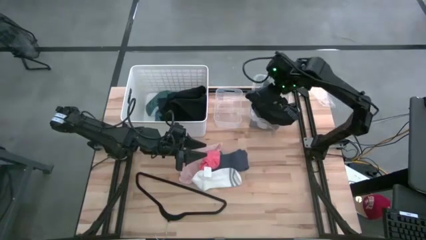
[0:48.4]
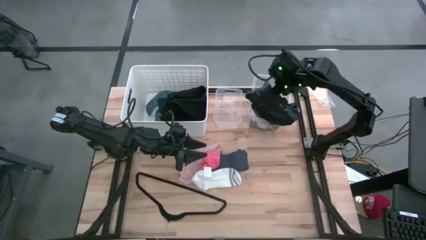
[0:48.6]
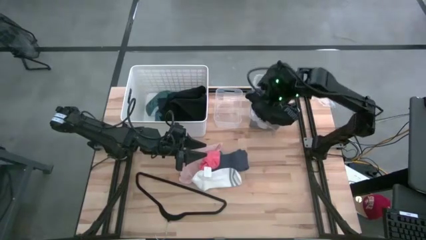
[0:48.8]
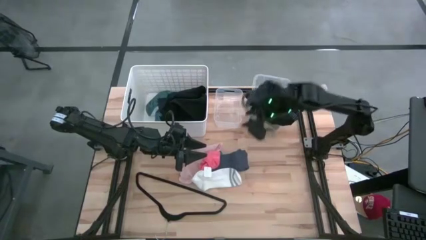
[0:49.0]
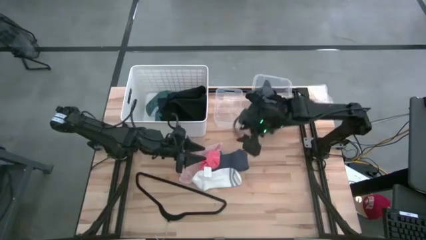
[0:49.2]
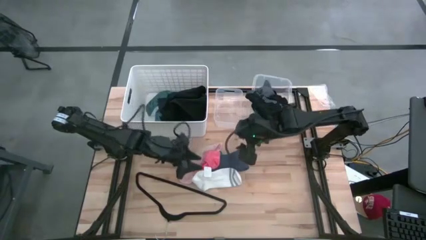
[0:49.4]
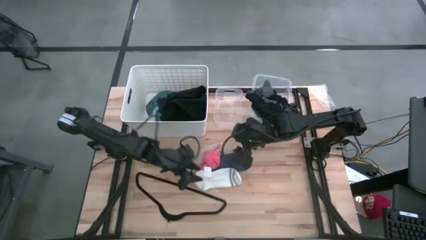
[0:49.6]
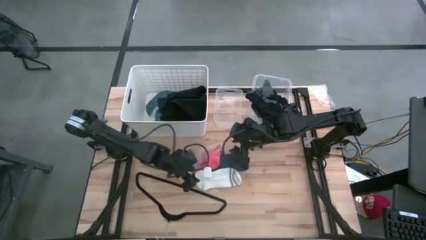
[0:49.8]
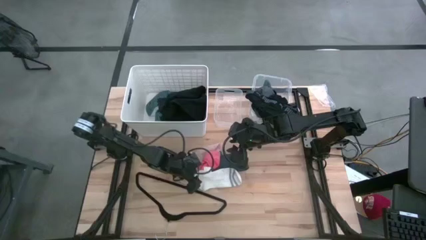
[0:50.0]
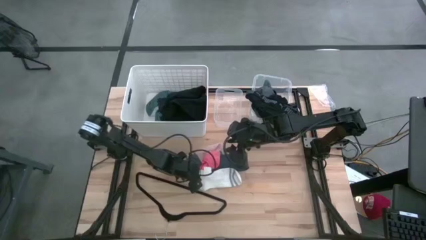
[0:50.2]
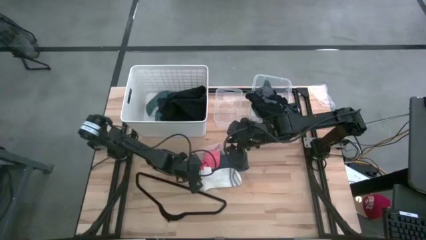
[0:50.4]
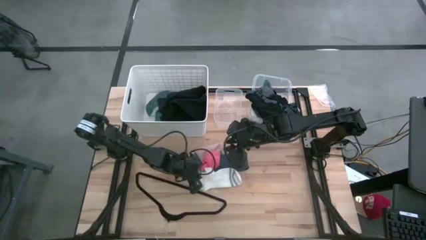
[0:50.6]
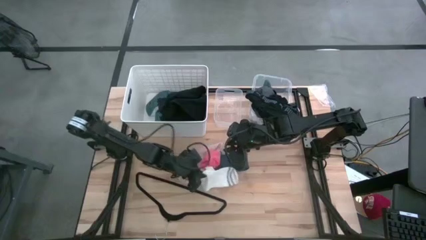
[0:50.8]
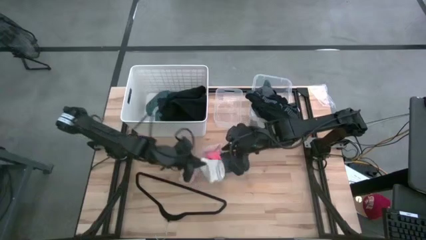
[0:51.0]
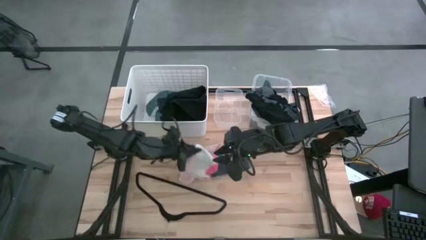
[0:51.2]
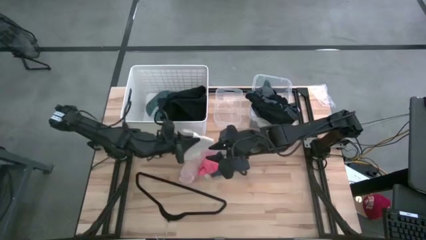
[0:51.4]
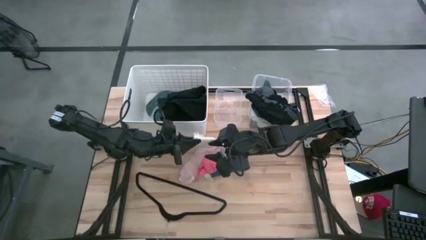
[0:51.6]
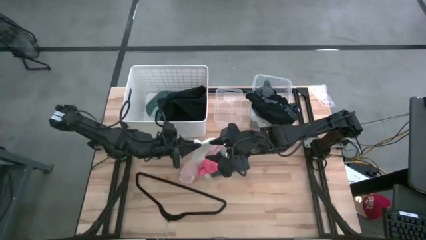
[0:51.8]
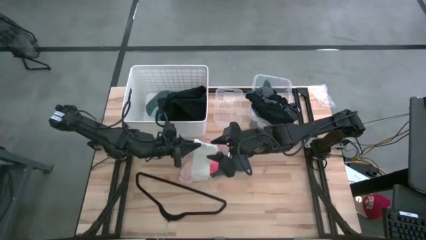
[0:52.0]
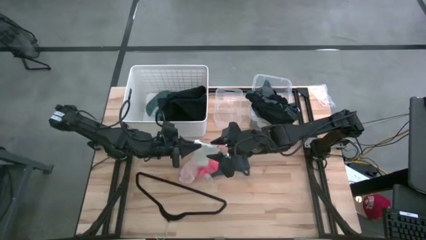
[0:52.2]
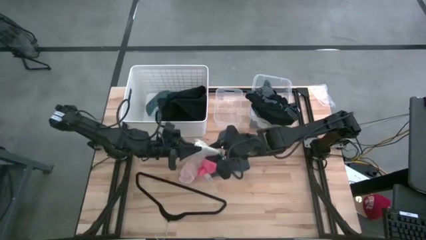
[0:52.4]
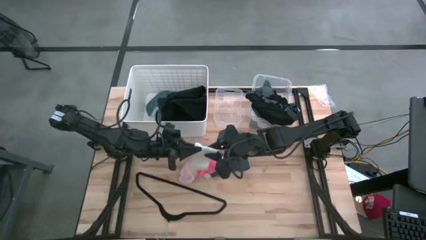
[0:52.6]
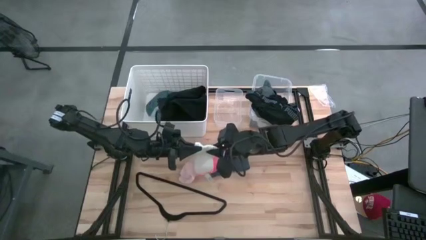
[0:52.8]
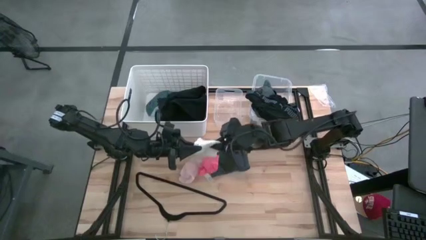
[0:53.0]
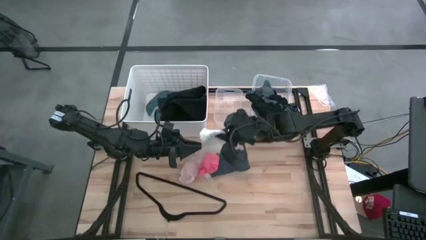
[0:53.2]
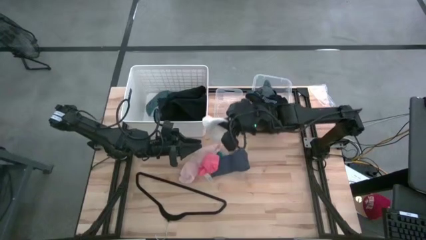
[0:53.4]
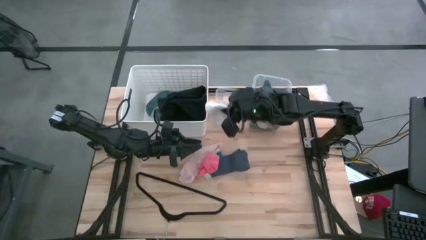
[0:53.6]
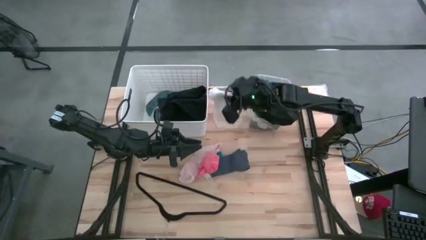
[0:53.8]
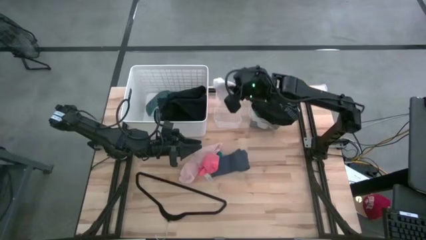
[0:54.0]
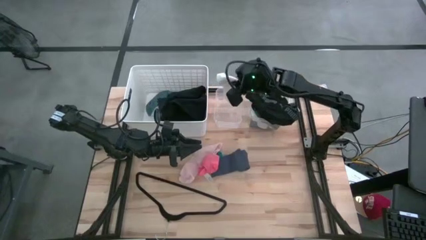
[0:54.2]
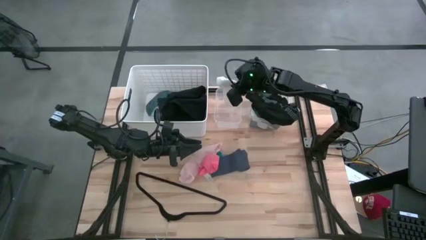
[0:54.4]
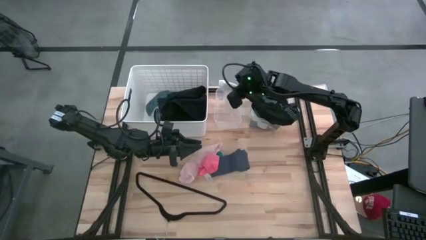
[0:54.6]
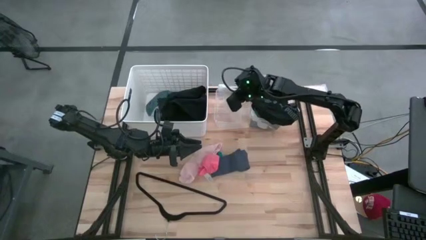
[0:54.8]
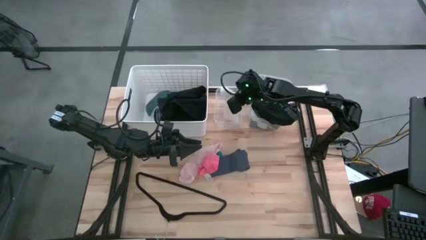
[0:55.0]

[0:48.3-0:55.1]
Task: Pick & Place Cloths
Put the white sock into the small transparent bin

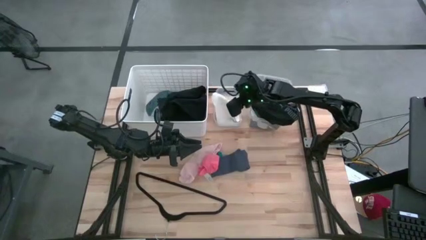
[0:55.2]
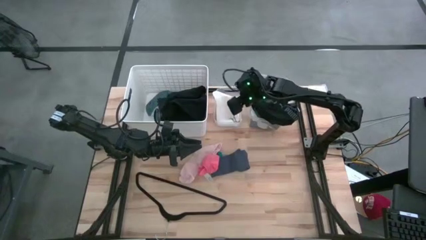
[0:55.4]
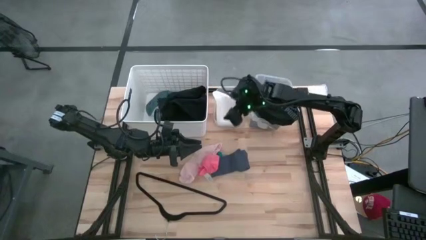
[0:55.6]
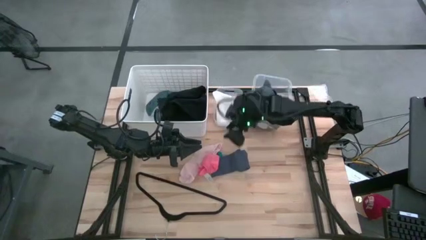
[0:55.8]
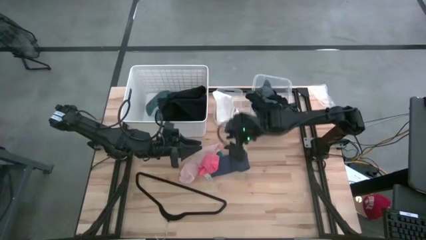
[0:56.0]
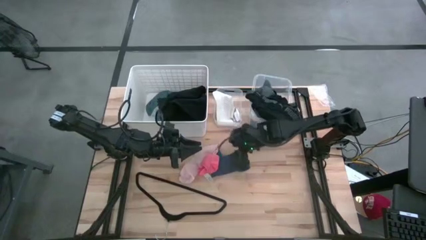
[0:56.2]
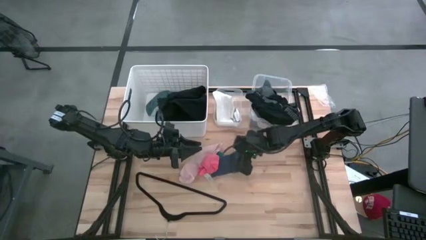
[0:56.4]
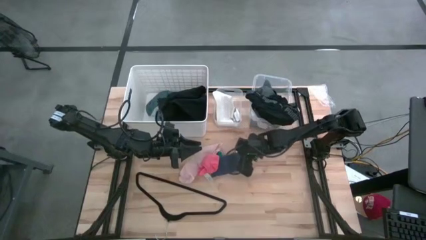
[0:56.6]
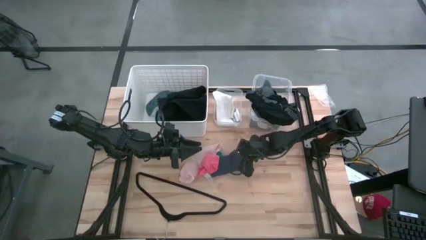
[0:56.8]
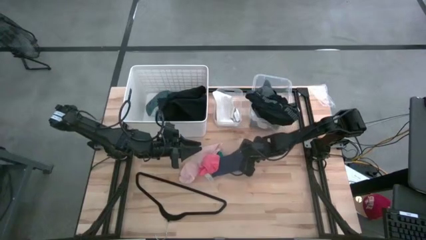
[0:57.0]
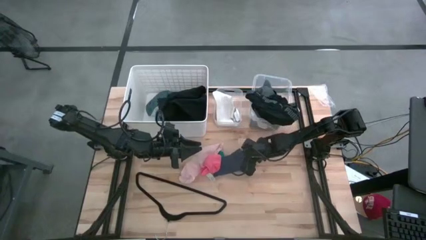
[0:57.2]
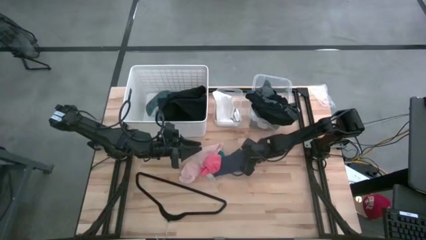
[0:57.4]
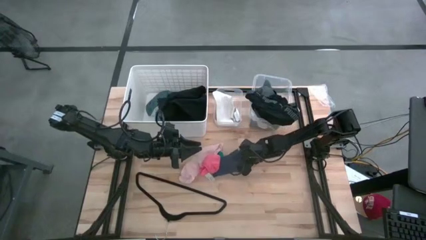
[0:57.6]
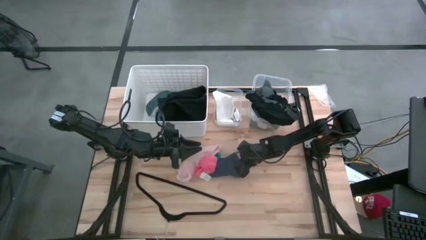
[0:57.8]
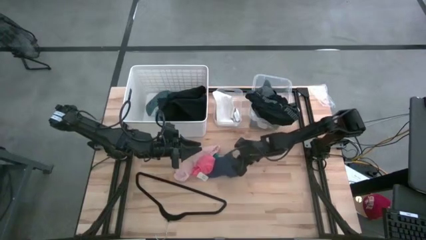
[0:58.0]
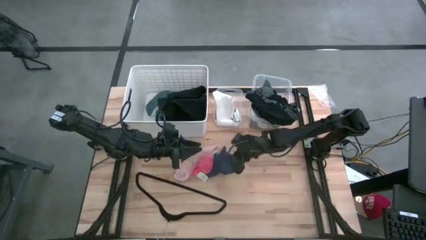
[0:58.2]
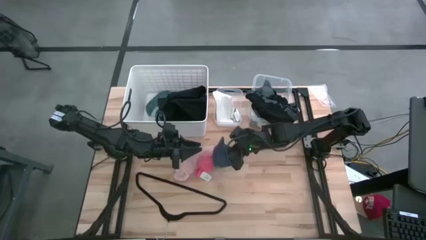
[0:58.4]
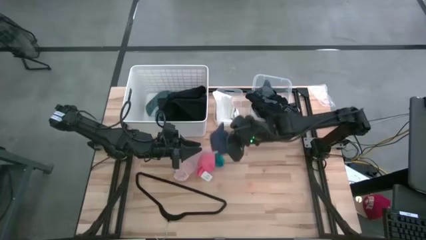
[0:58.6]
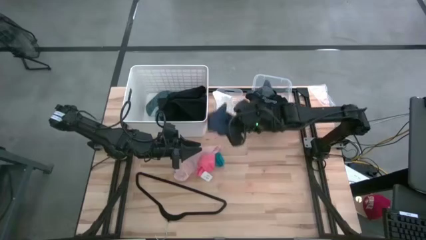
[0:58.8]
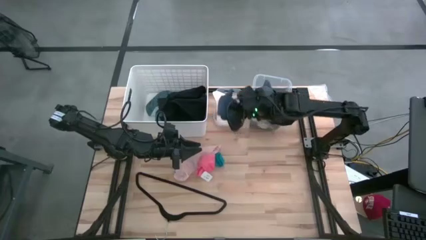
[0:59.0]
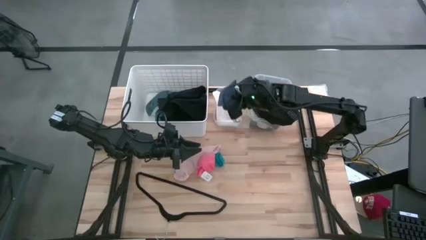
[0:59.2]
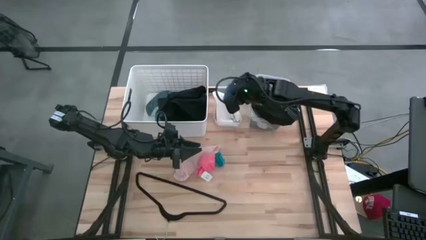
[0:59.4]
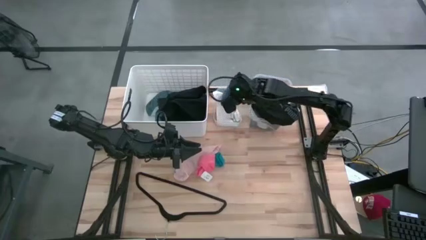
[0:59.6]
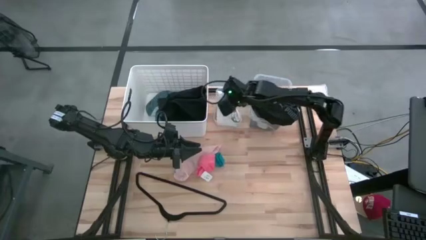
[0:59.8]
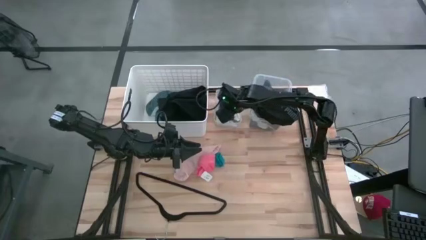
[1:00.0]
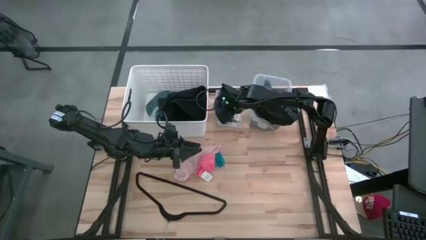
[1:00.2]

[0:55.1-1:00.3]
Put the blue sock into the small transparent bin

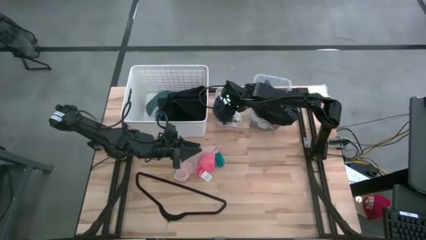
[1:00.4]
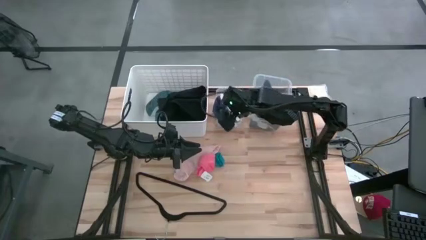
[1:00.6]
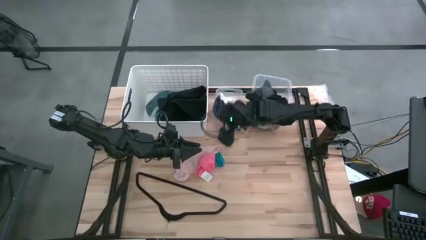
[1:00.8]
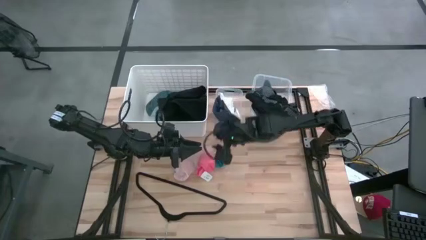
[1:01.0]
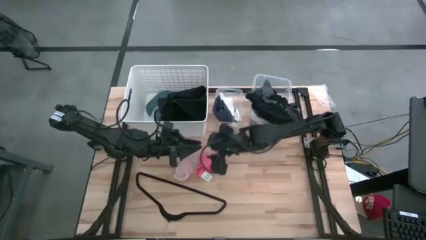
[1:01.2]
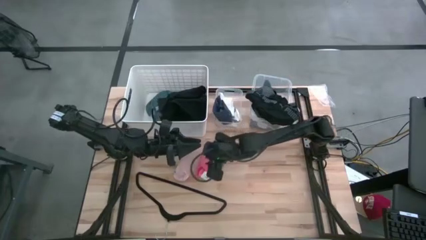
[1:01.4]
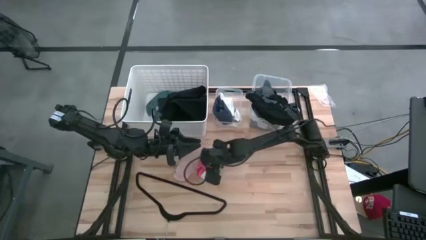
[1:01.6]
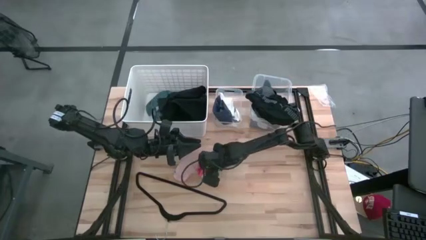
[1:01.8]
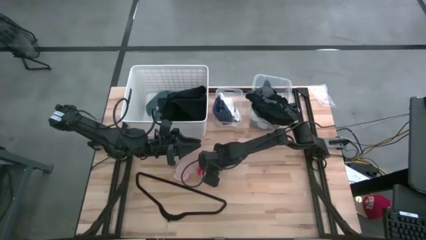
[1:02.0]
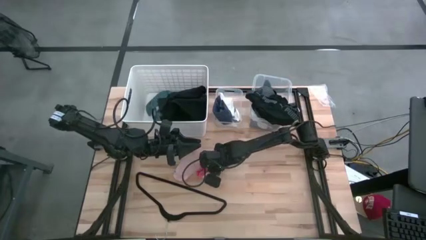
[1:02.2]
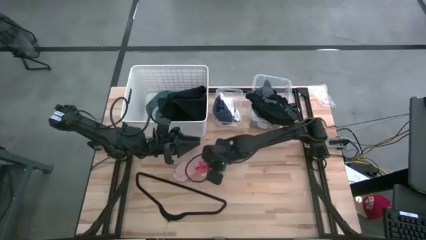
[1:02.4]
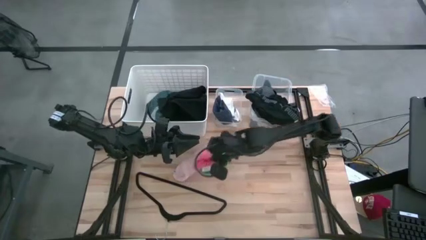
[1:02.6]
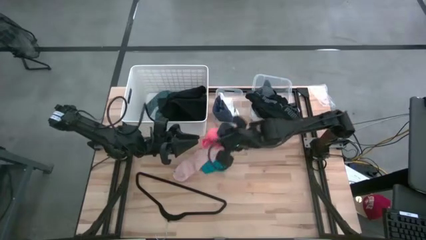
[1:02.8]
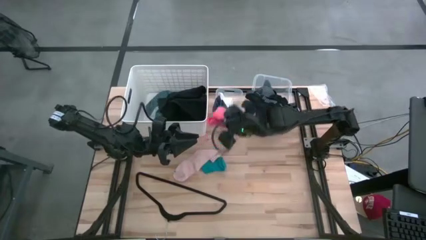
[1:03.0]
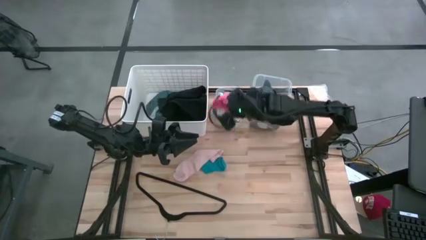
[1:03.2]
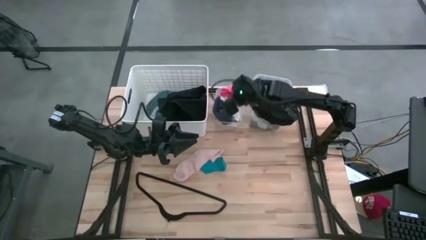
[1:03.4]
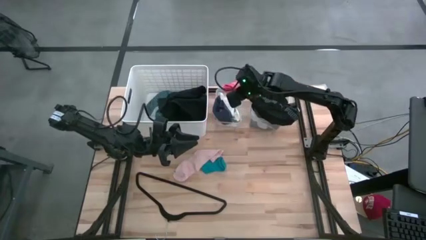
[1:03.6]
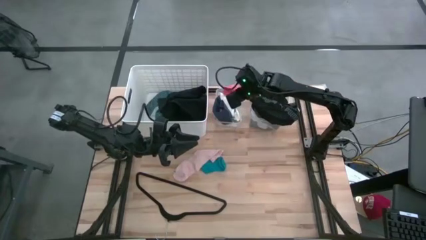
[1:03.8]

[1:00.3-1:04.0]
Put the orange sock into the small transparent bin

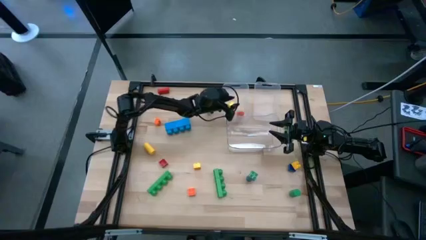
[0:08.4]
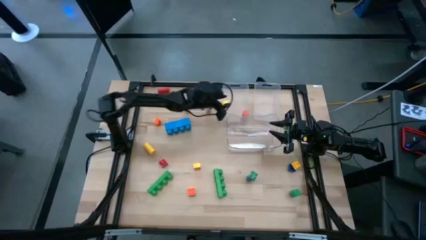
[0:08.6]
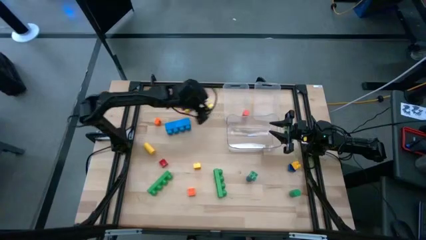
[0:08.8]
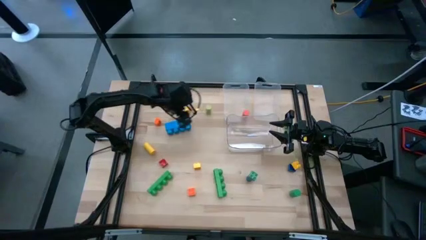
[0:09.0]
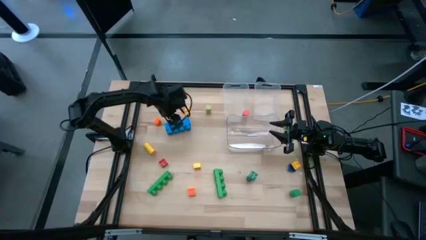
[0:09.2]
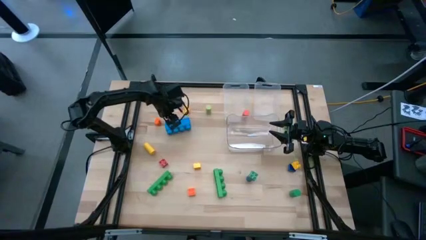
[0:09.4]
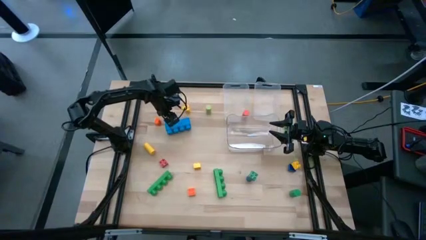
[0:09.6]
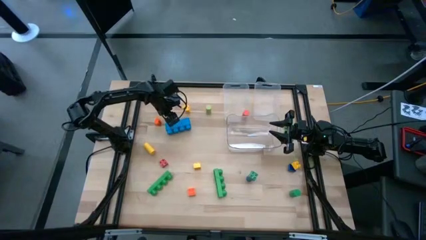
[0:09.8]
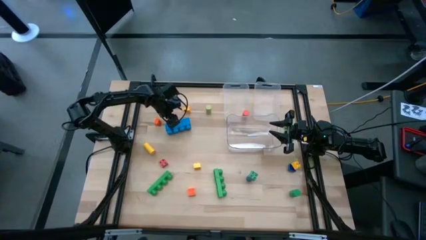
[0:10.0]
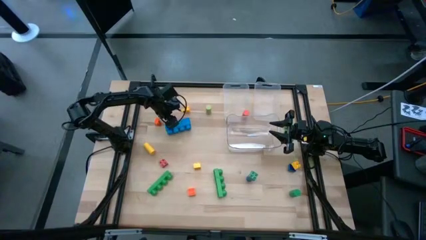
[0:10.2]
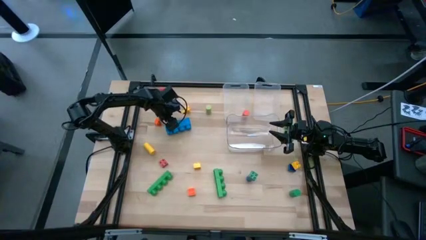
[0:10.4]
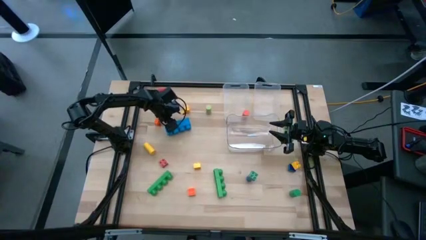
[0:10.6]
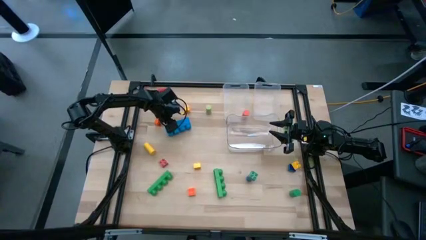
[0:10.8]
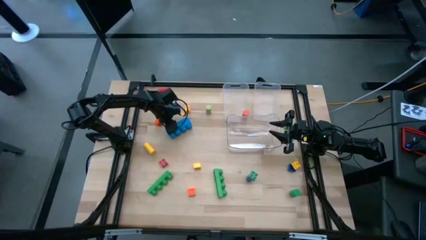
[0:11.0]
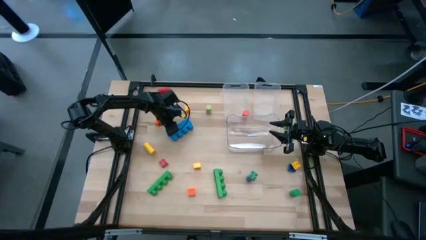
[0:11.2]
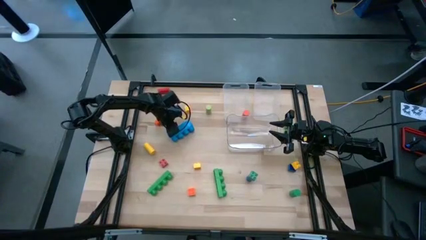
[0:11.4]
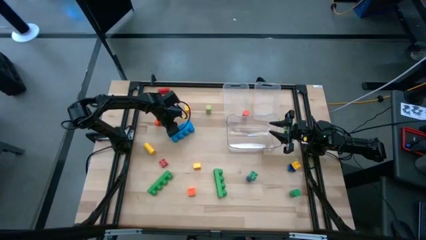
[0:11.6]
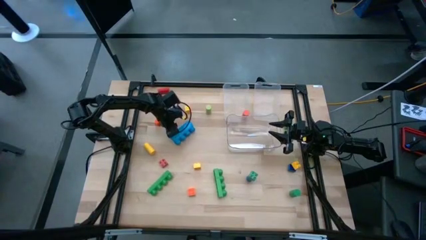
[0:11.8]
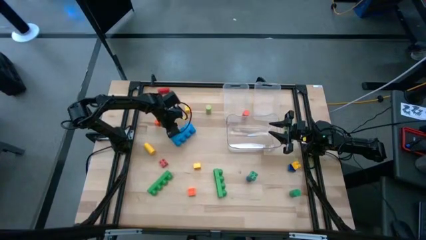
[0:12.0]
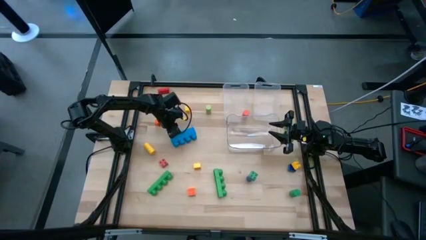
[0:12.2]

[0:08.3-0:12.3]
Task: Sort blocks by size
Put the large blue 4 stud game piece into the bottom transparent bin
